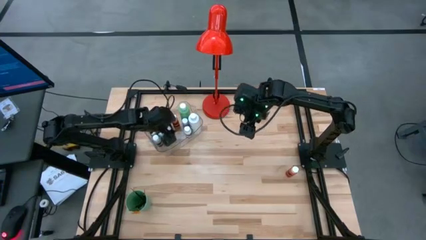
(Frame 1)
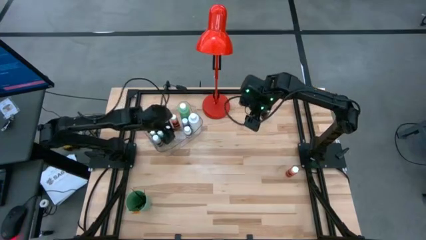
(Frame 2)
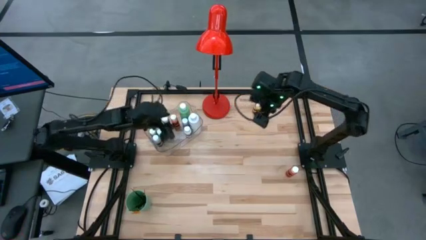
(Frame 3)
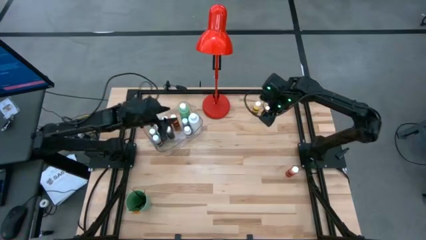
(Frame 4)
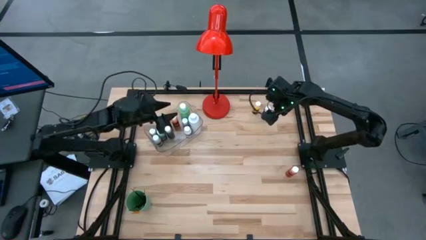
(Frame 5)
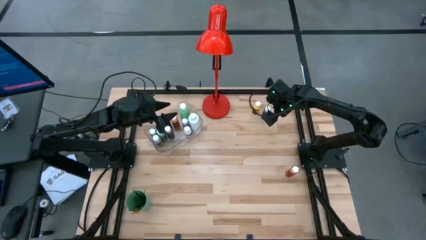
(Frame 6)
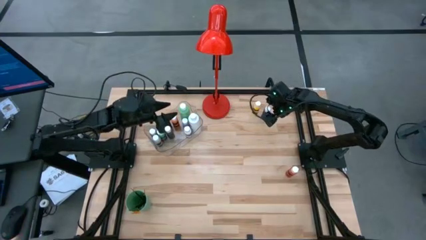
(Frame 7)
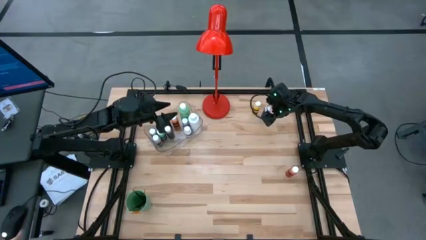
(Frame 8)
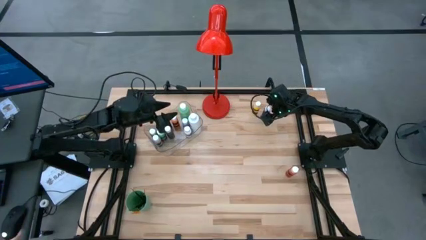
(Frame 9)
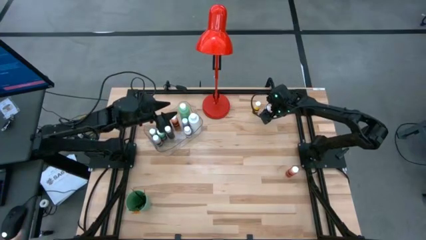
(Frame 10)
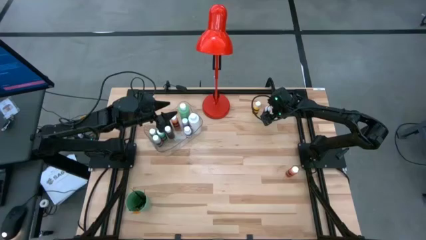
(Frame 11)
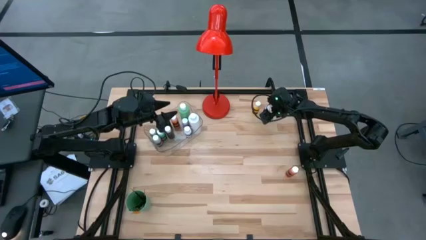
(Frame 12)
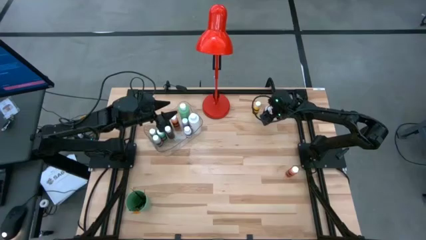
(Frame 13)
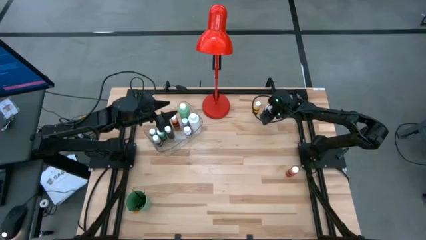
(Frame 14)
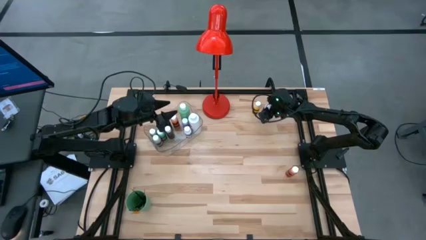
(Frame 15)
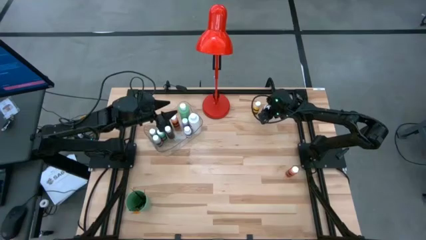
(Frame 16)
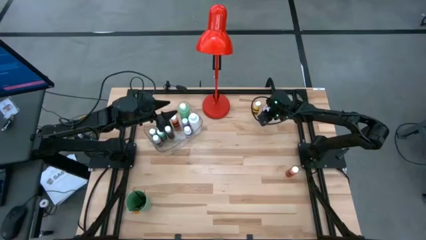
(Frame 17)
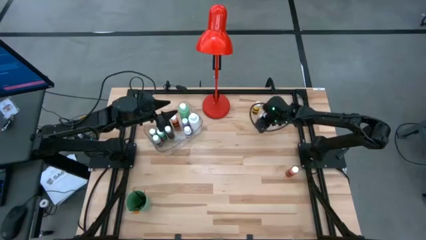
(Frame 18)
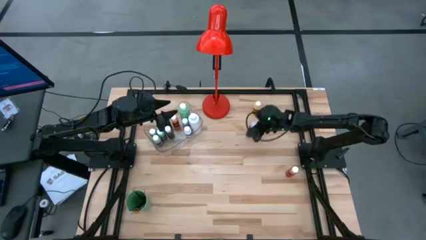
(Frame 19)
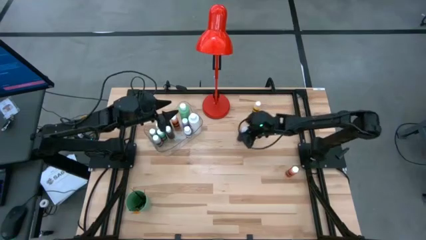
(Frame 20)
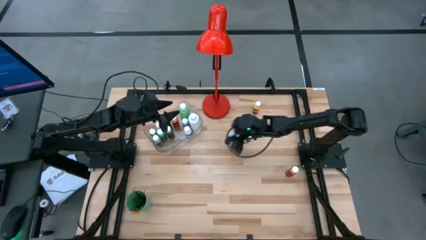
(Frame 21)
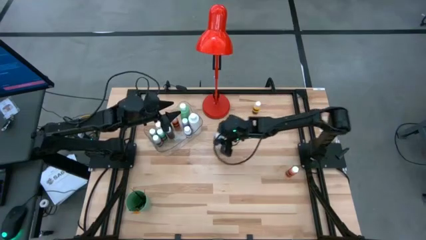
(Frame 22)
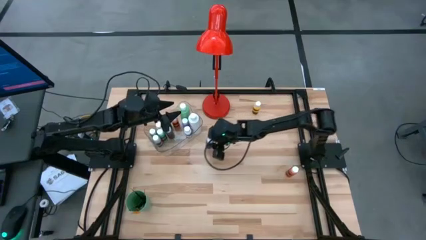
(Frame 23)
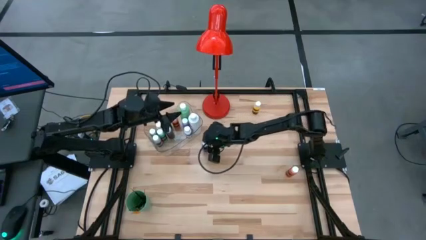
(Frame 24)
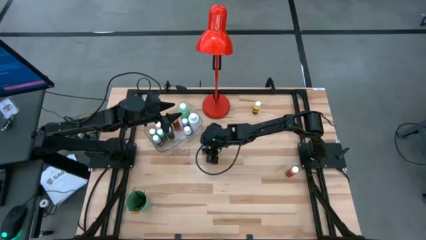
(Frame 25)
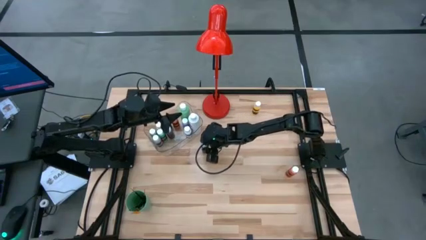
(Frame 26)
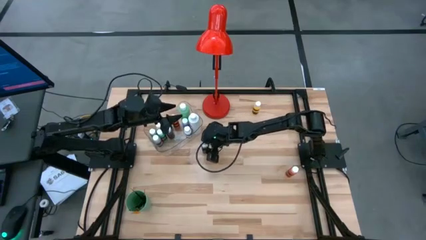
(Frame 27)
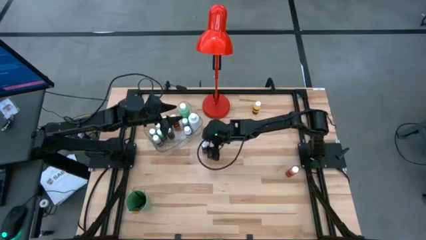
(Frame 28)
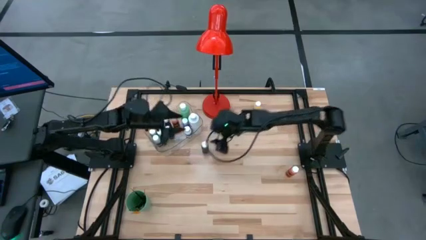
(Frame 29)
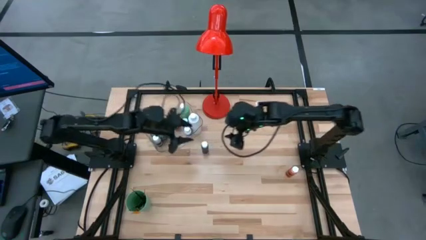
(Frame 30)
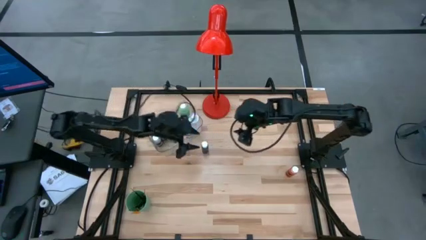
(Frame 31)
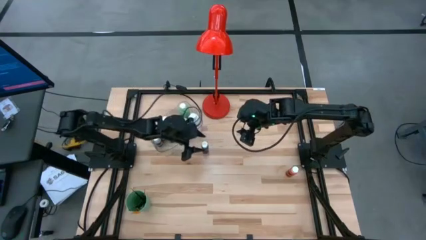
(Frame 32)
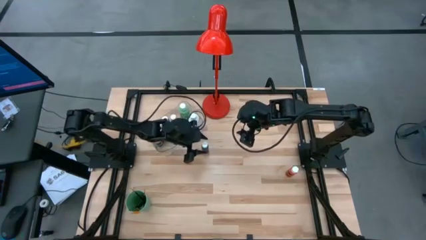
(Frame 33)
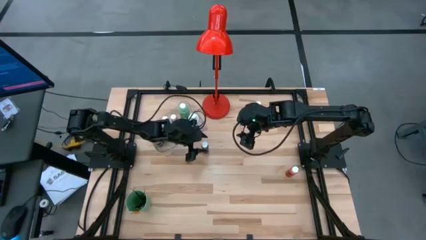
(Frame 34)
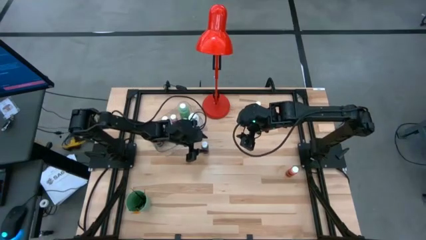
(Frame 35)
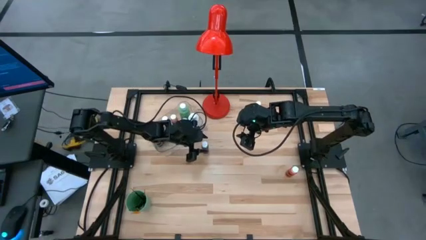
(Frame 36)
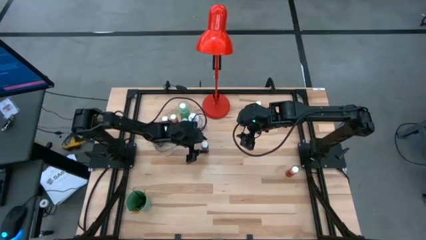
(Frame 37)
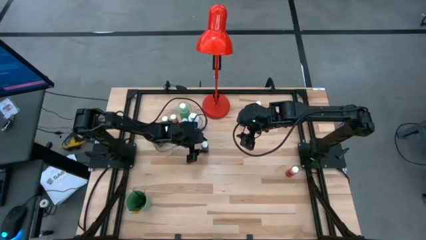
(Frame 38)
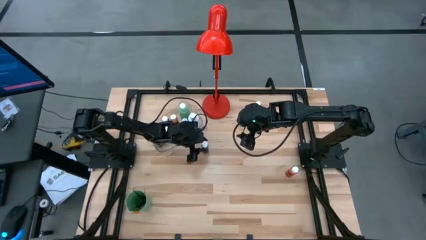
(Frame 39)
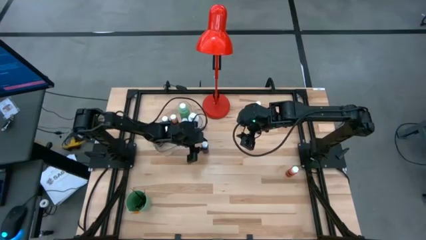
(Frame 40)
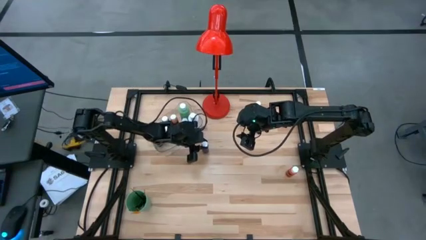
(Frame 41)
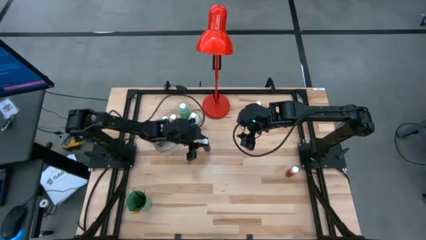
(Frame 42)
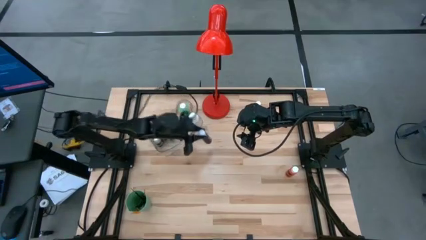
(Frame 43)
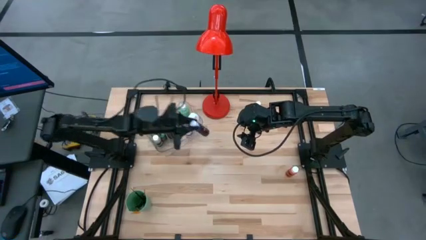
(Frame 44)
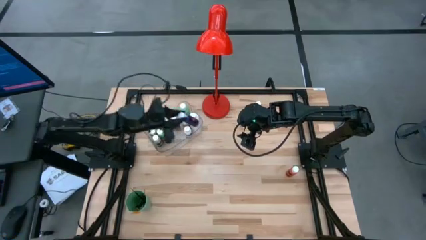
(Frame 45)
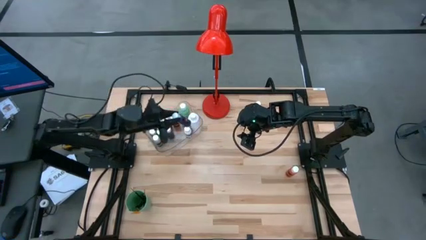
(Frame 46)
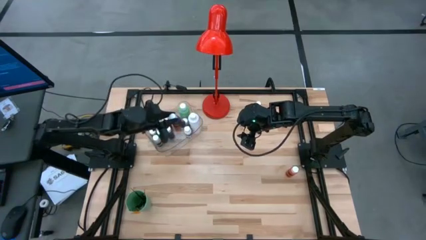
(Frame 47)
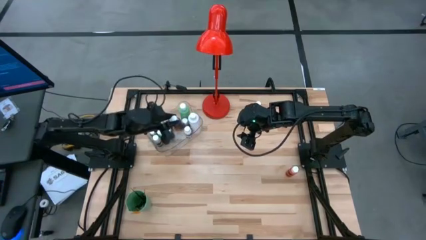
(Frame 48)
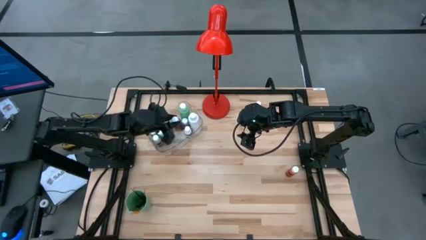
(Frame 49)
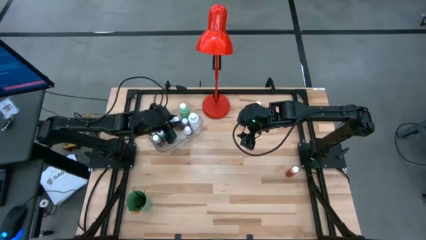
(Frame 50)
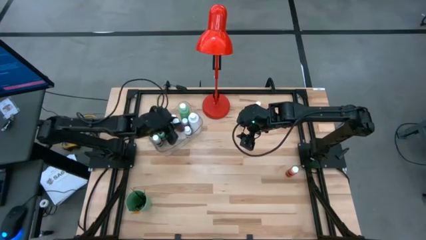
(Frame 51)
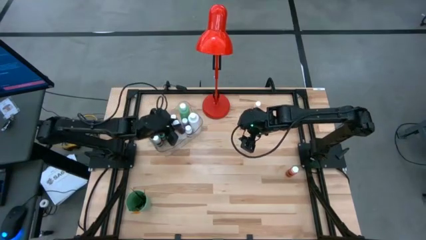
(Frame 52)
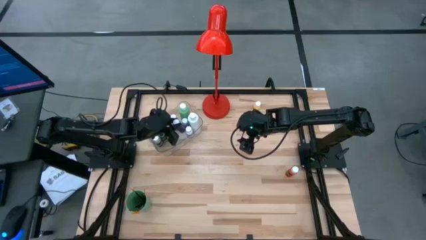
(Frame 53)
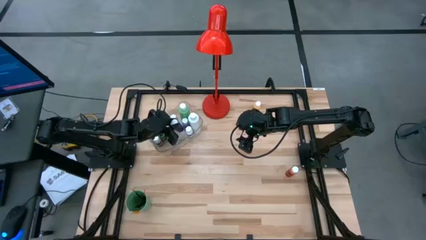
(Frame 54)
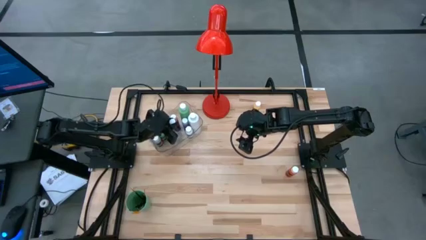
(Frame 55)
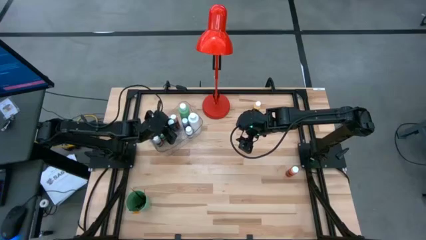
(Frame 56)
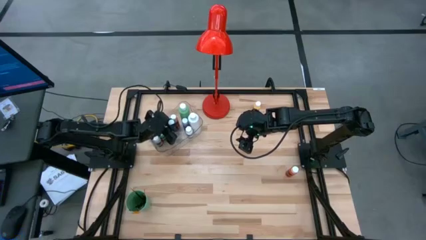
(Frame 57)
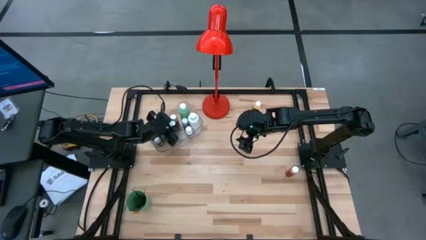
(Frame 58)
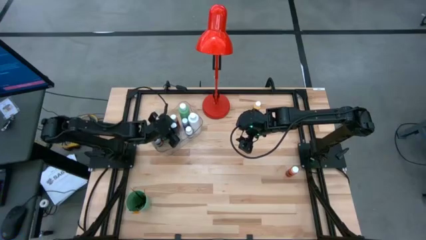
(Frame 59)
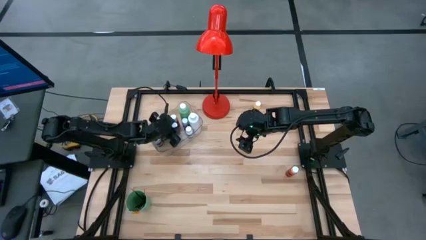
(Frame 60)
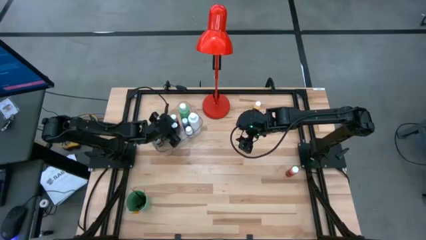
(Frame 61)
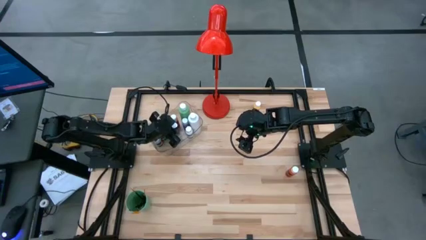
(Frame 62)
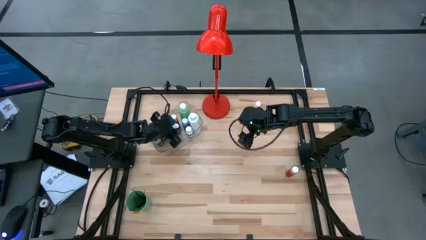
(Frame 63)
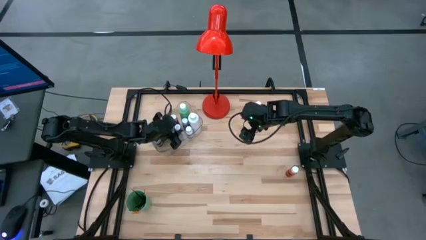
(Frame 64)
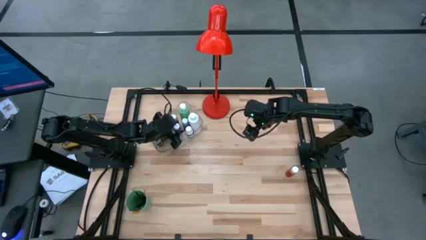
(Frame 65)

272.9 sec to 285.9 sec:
Task: Pick & Place Paint Supplies
Put the blue paint bottle into the transparent bin

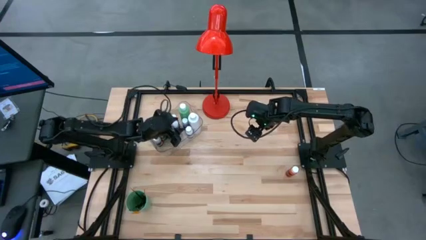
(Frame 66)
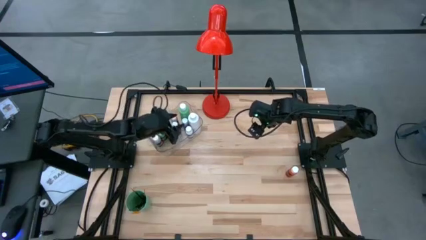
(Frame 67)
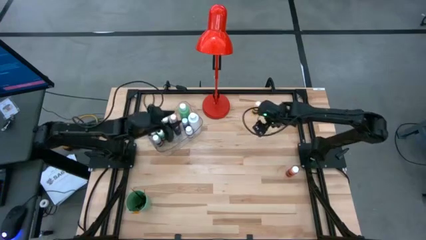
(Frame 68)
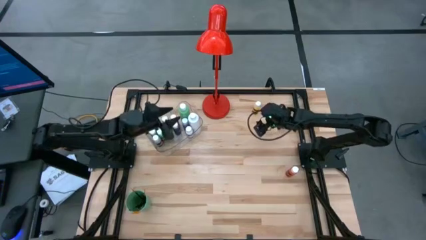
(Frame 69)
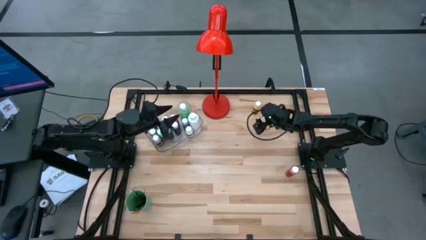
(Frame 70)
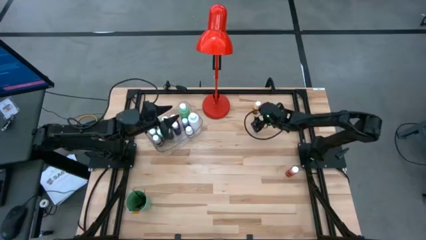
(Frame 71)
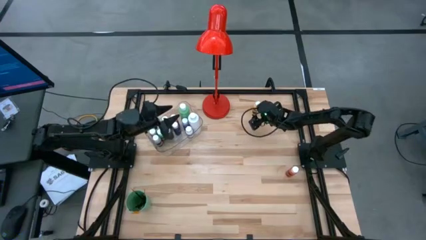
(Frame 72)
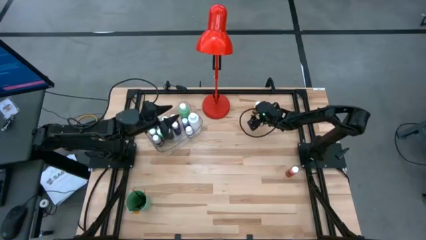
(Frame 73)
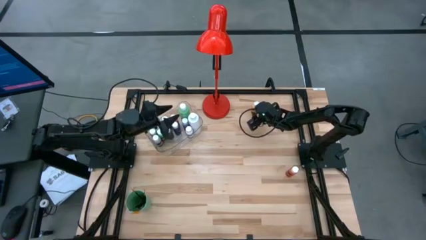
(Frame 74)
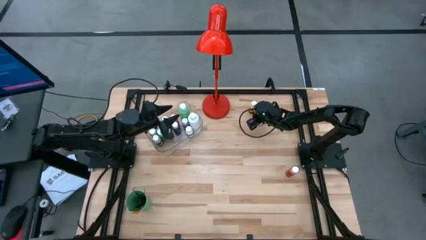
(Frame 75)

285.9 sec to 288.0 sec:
Put the yellow paint bottle into the transparent bin
